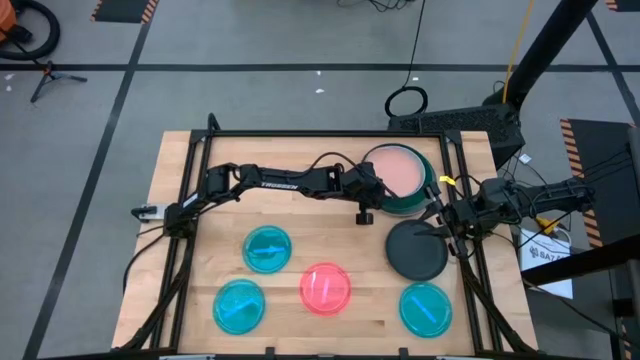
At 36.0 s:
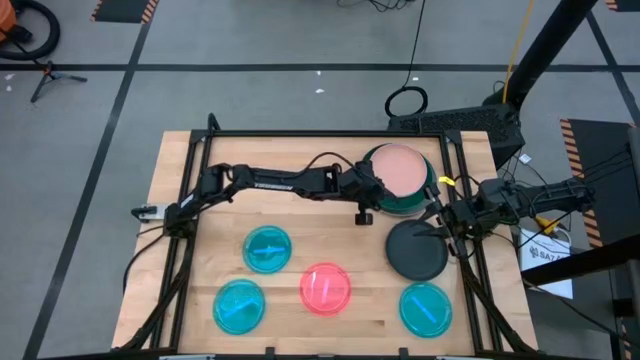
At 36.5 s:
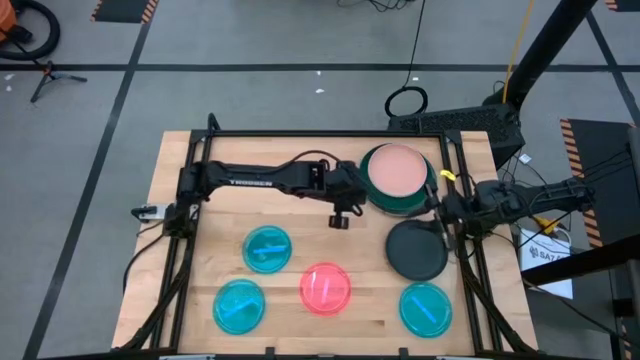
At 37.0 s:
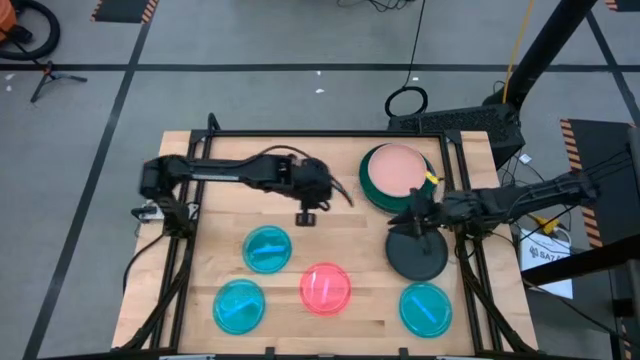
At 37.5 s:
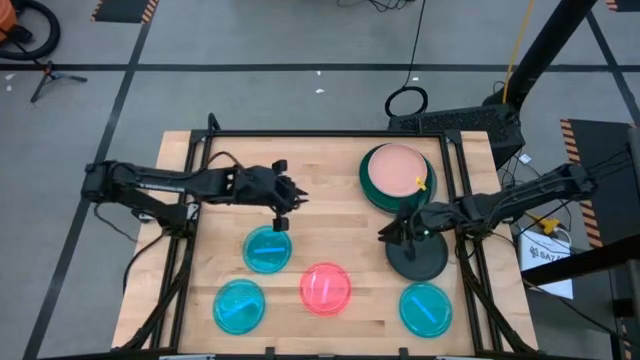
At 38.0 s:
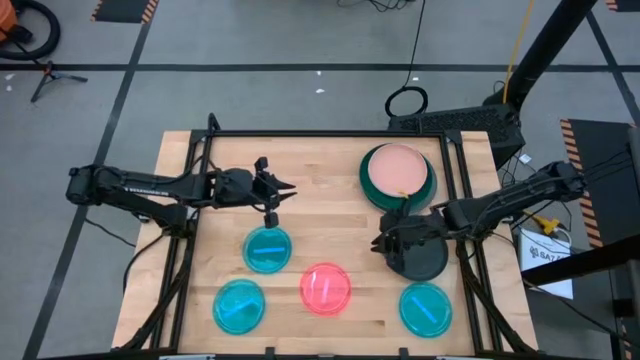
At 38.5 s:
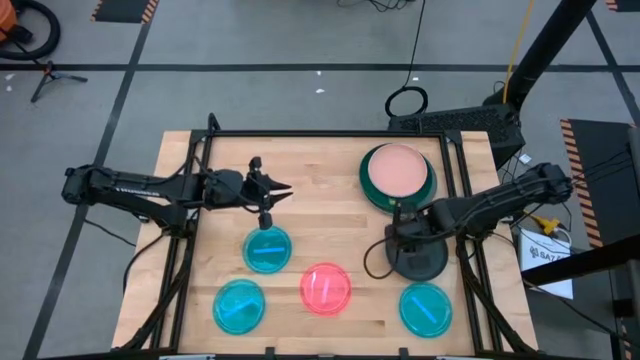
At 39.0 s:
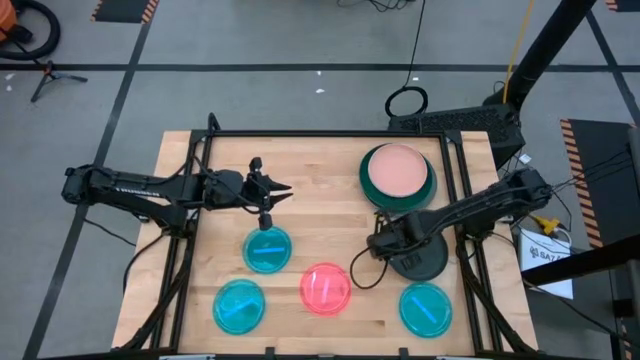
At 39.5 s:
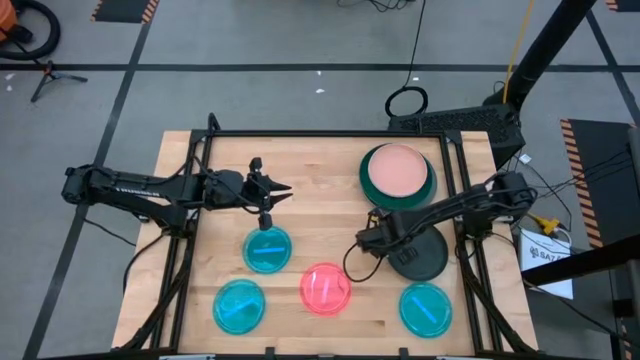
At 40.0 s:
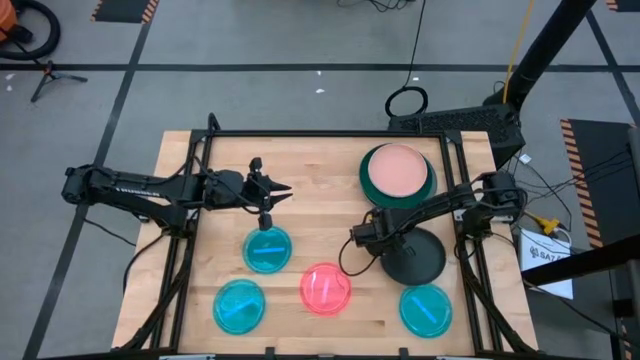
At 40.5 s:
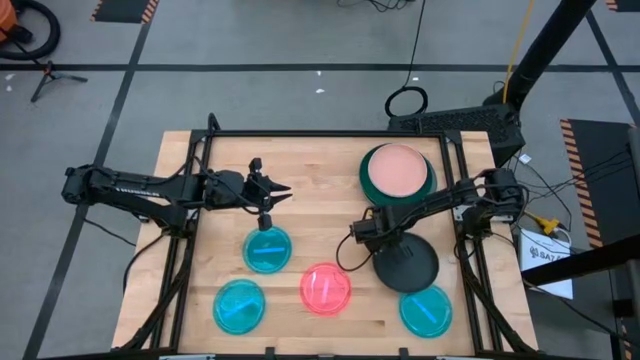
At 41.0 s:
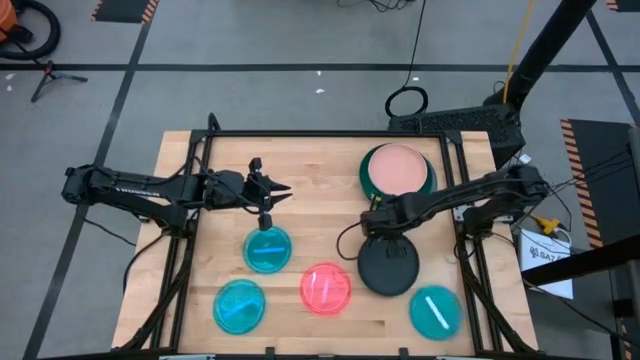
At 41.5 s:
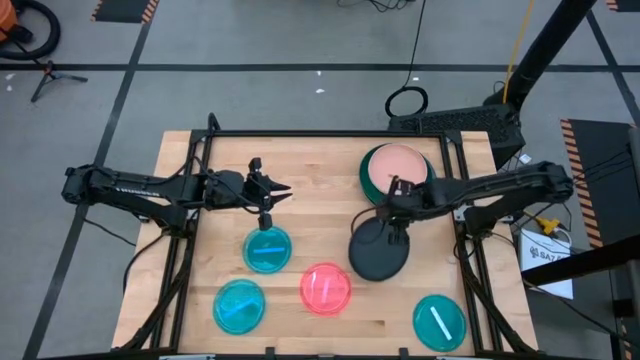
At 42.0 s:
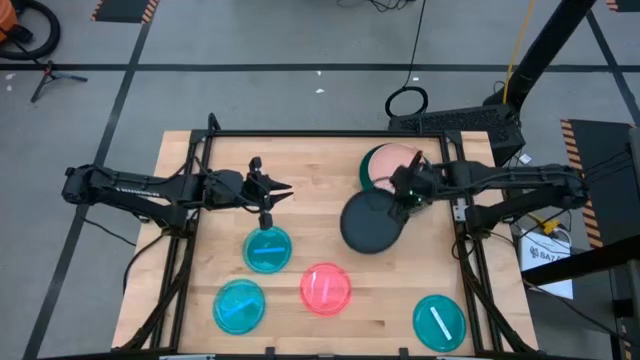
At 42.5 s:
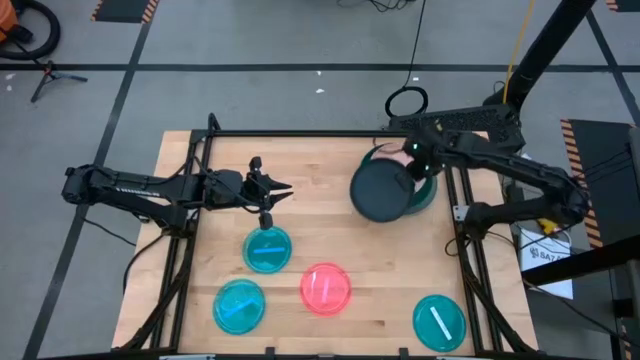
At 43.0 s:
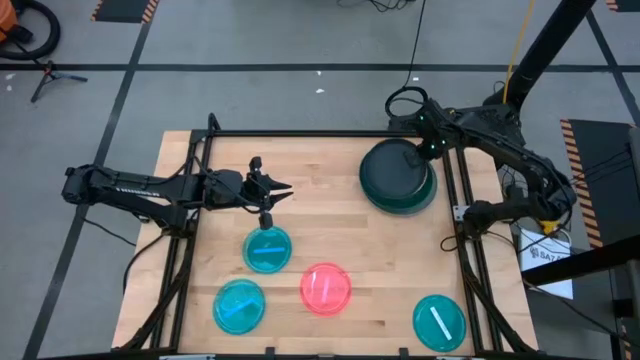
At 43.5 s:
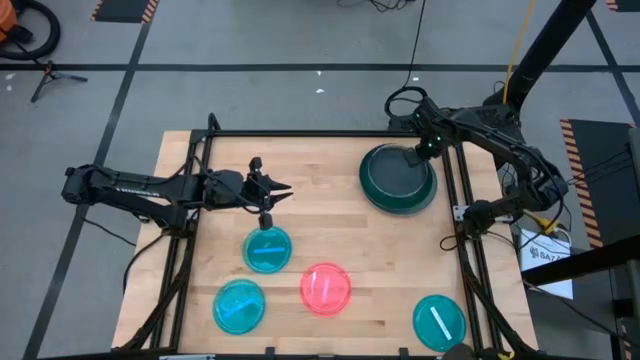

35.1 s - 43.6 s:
Task: Stack plastic plates
Stack the black plate on the light pink plate

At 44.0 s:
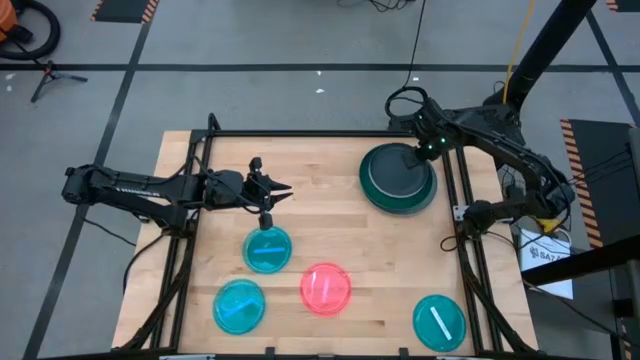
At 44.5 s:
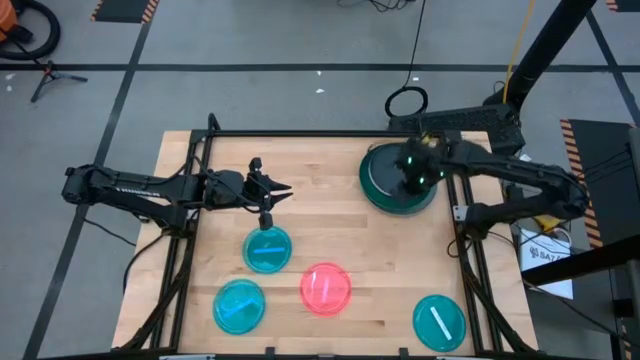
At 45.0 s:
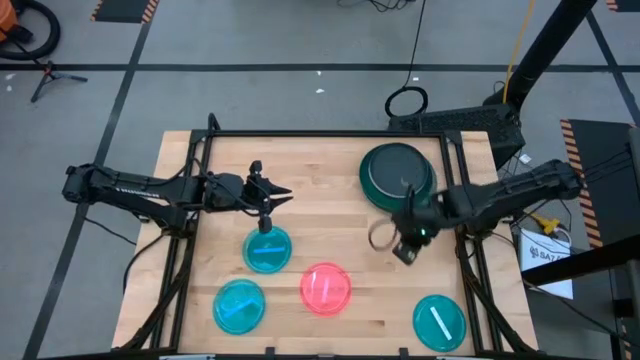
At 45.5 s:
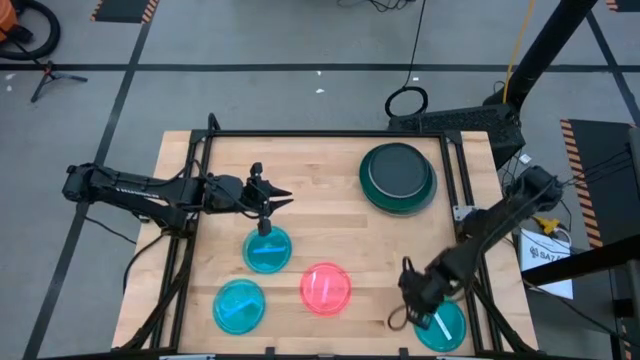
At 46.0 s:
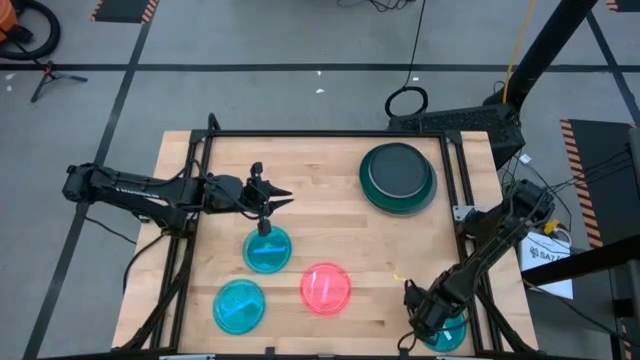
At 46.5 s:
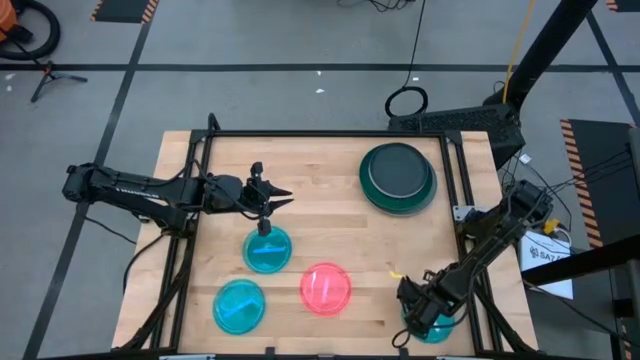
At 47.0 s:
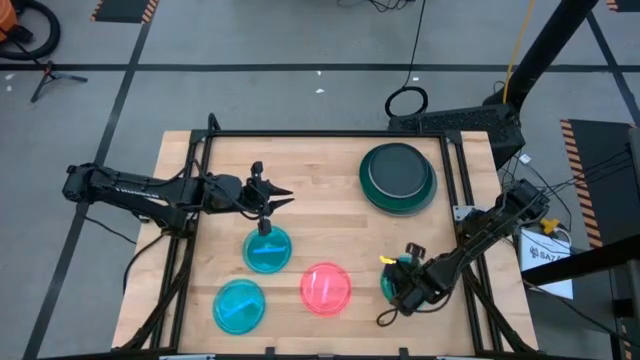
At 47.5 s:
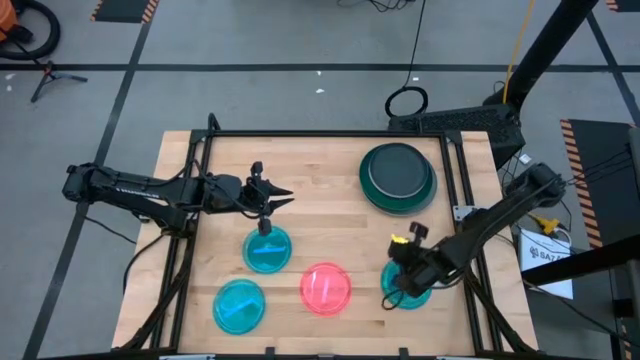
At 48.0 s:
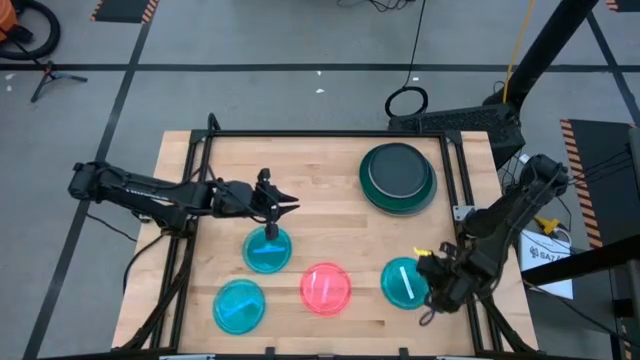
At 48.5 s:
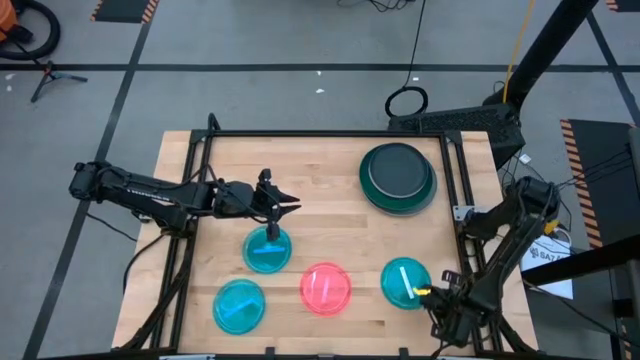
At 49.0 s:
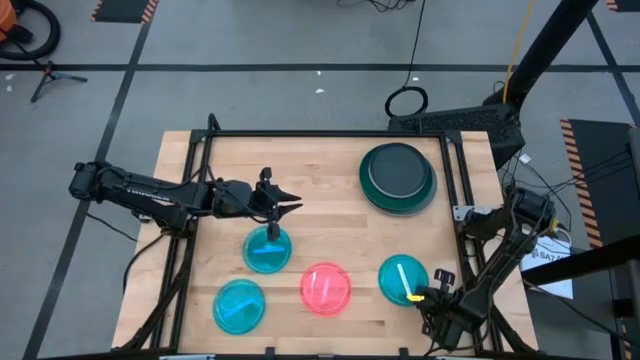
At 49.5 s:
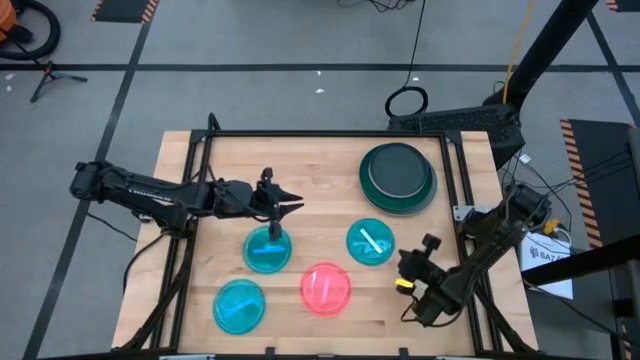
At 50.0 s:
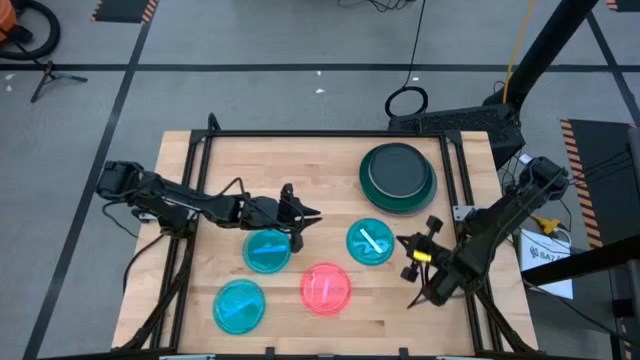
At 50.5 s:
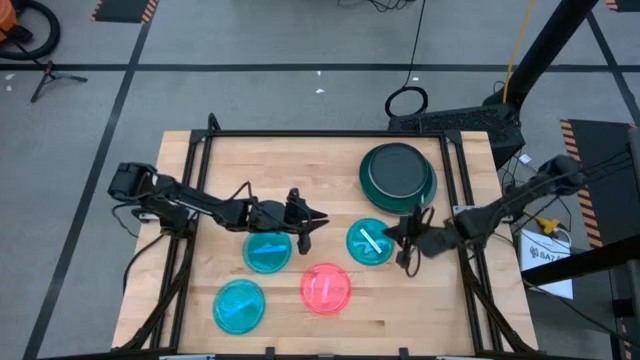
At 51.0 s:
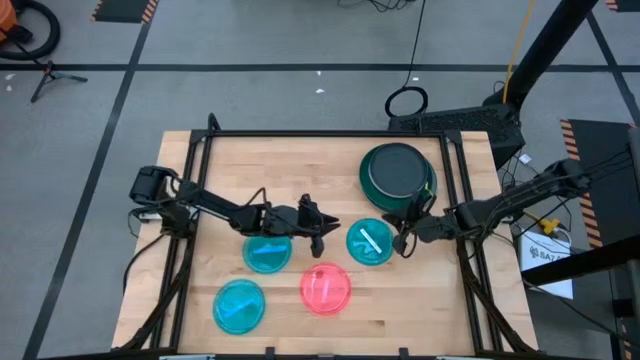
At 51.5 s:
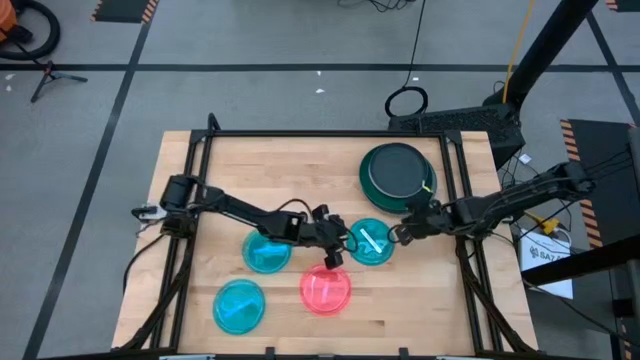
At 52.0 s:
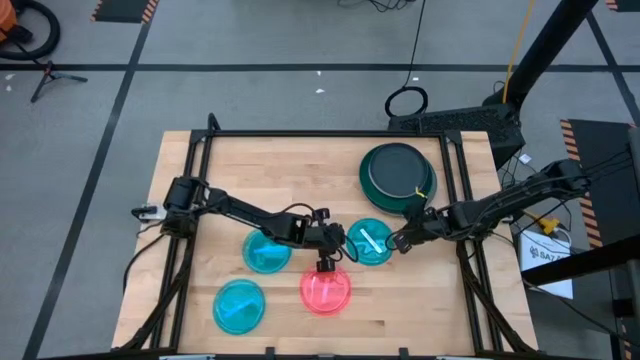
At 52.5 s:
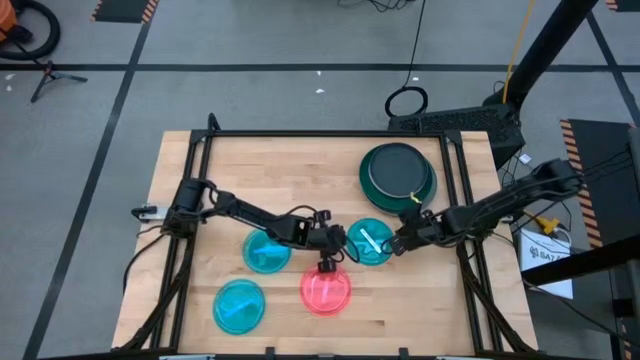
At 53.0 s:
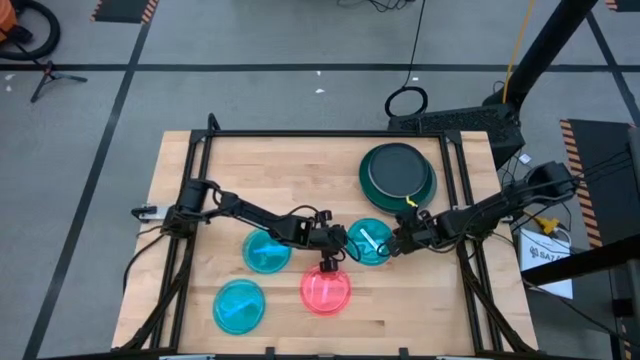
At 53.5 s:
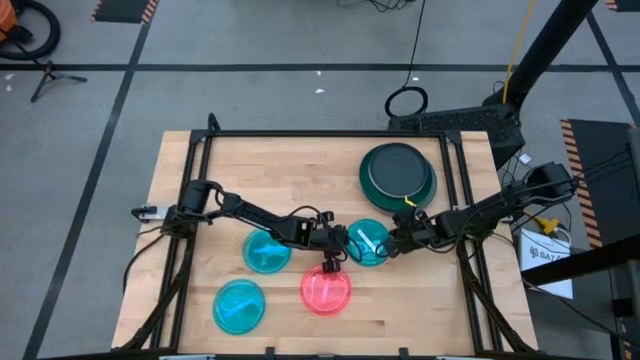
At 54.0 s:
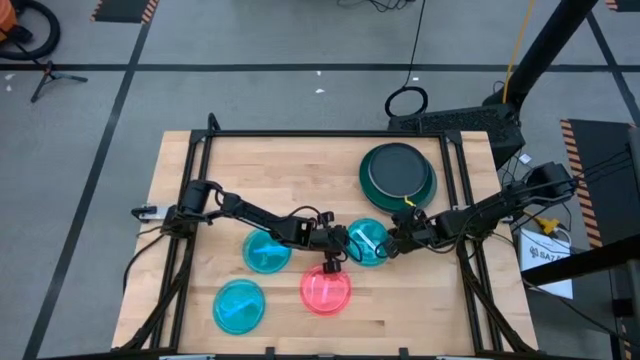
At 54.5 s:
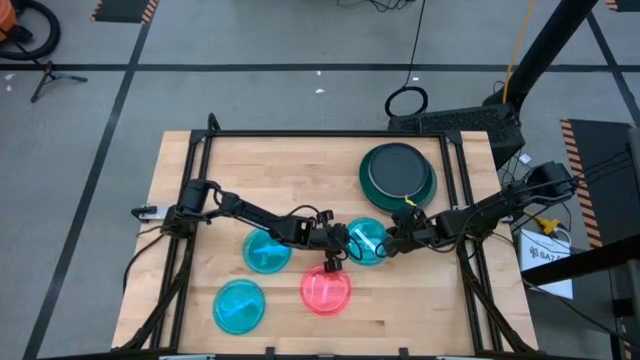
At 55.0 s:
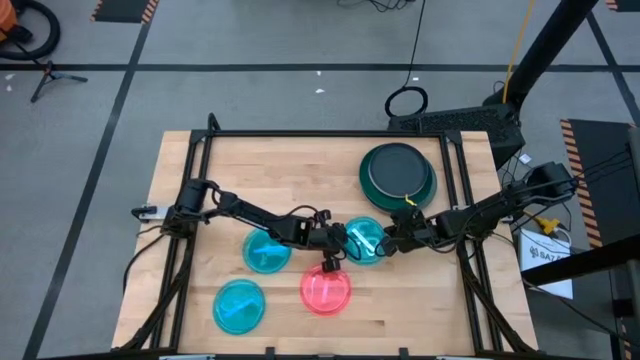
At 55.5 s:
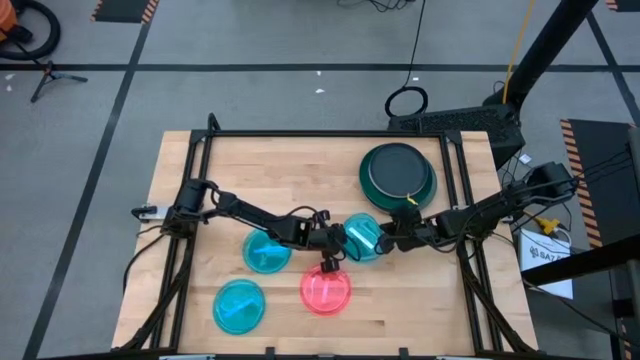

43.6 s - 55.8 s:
Stack the right blue plate on the black plate

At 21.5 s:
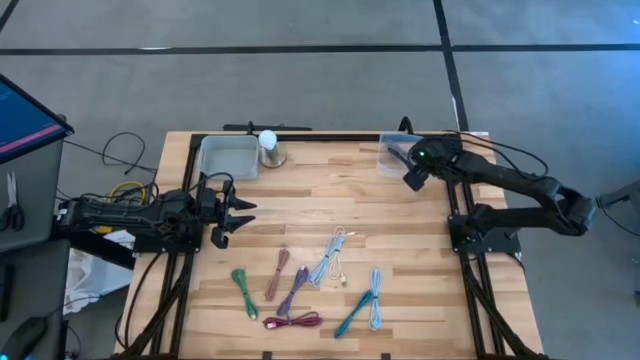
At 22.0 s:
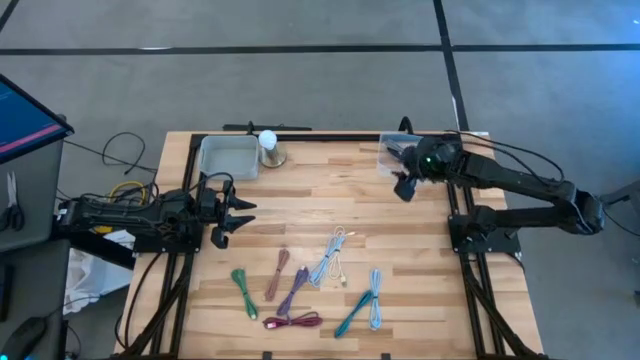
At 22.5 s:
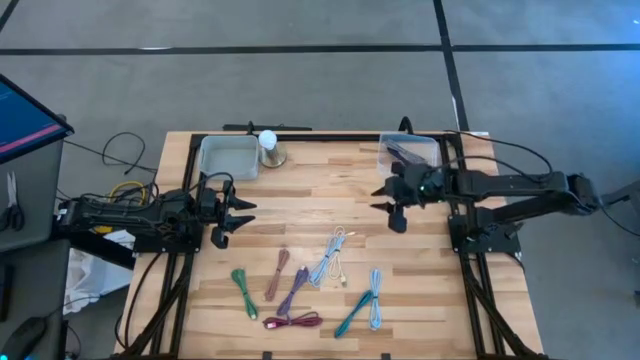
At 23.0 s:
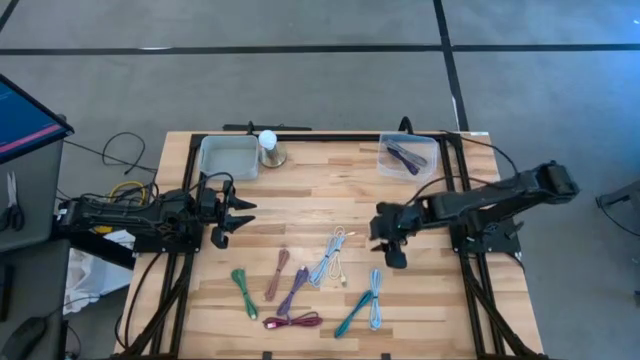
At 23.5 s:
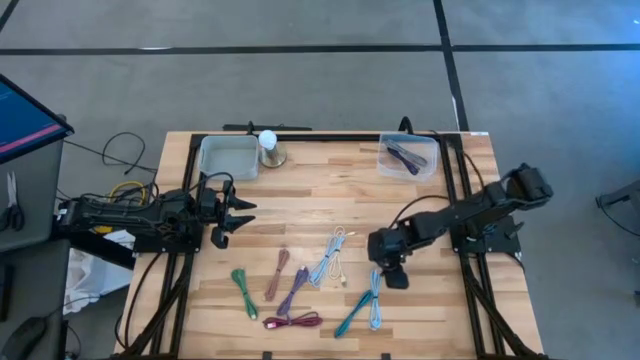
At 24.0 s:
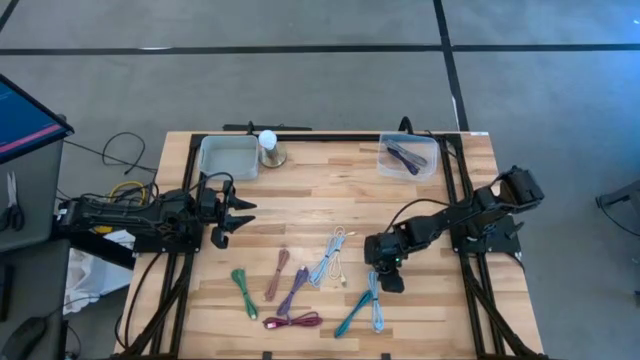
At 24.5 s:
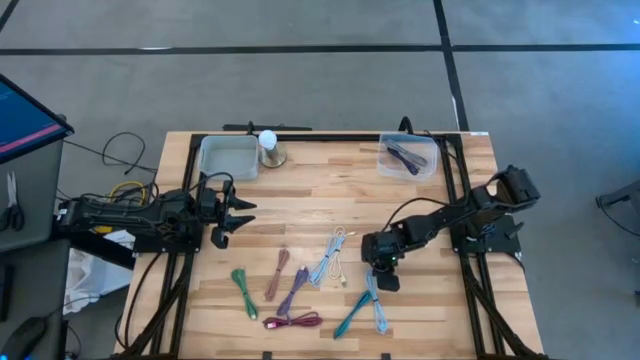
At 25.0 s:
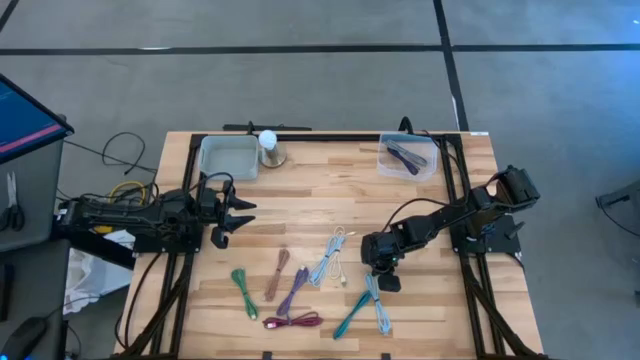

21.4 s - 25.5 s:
Task: Pick & Place USB Port
Put the bottom light blue charger cable into the gray bin
